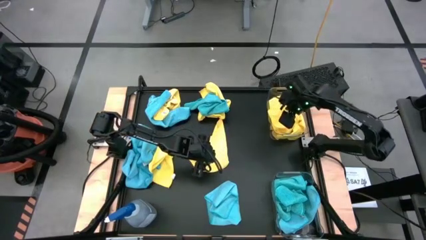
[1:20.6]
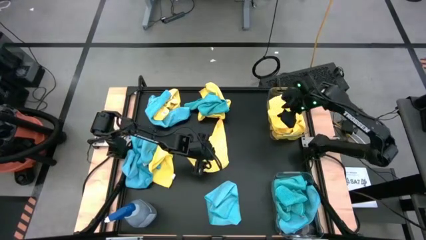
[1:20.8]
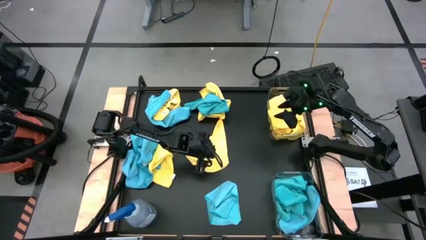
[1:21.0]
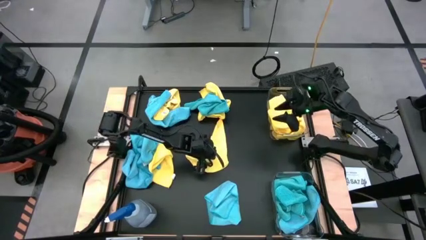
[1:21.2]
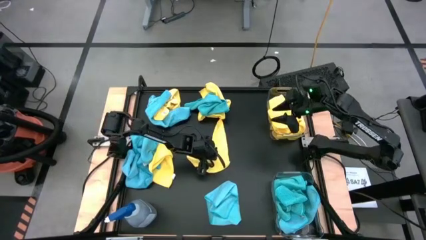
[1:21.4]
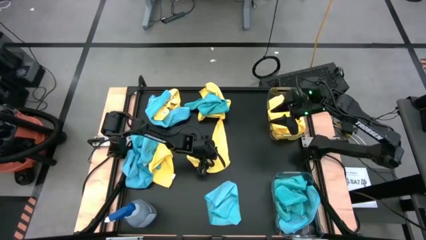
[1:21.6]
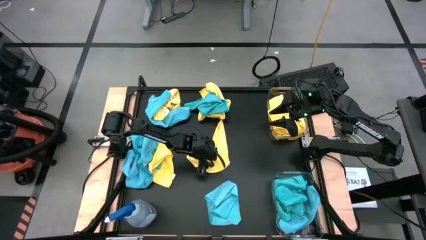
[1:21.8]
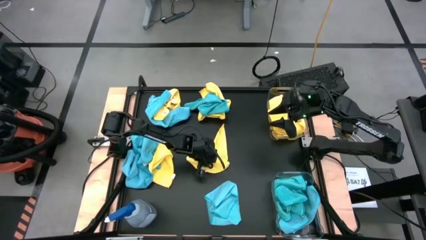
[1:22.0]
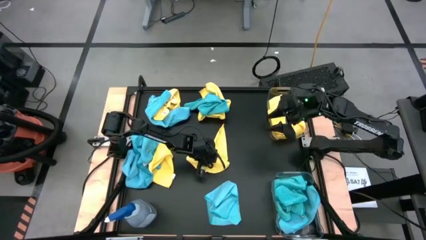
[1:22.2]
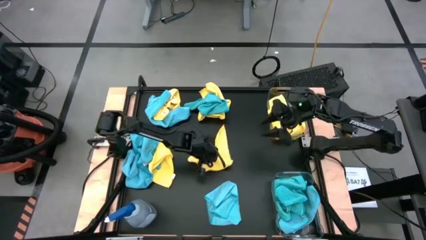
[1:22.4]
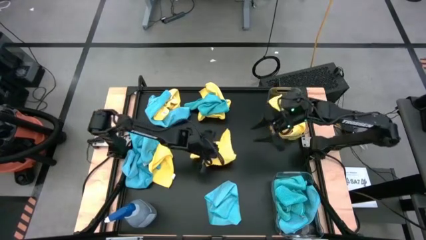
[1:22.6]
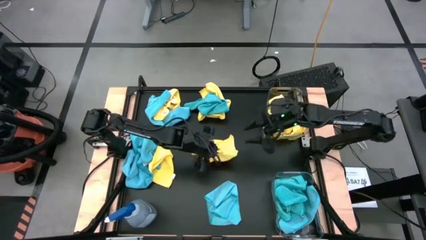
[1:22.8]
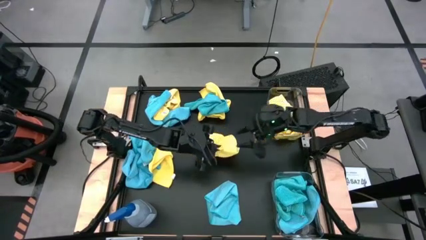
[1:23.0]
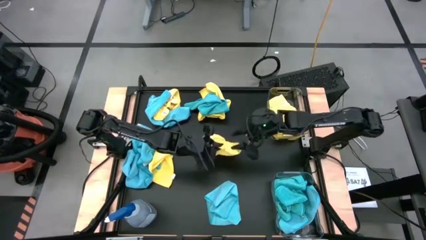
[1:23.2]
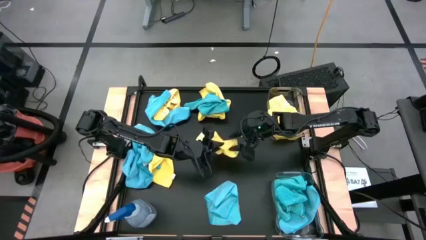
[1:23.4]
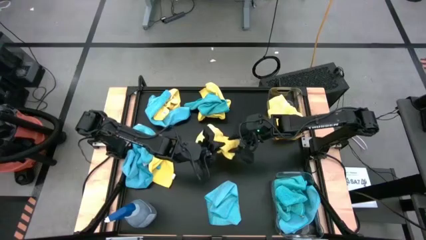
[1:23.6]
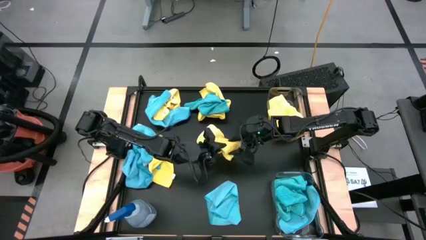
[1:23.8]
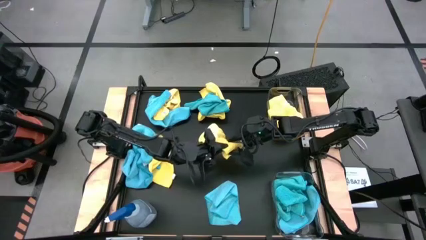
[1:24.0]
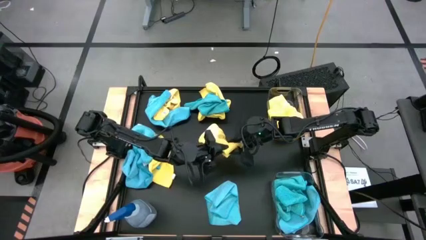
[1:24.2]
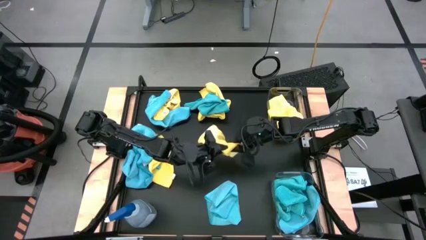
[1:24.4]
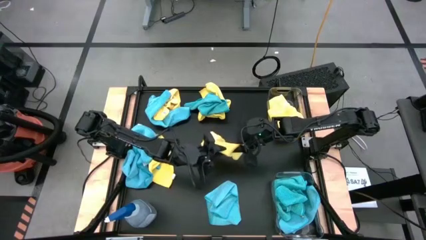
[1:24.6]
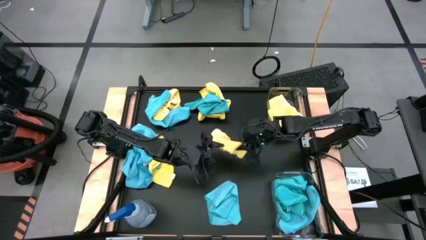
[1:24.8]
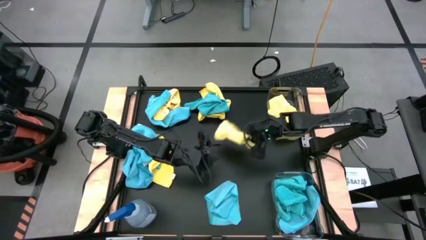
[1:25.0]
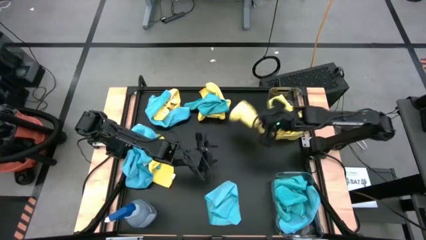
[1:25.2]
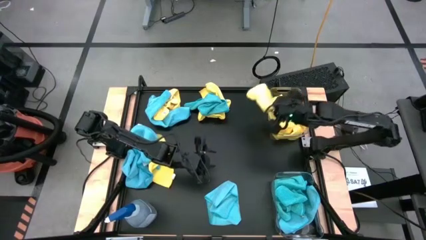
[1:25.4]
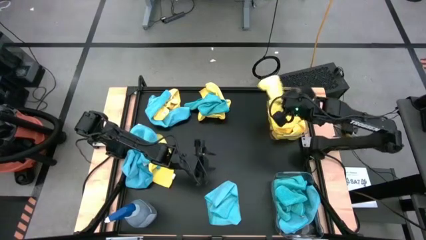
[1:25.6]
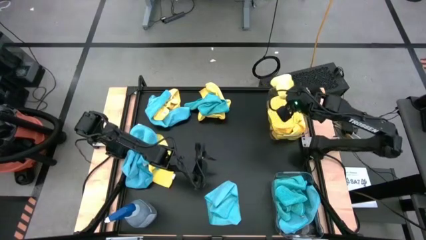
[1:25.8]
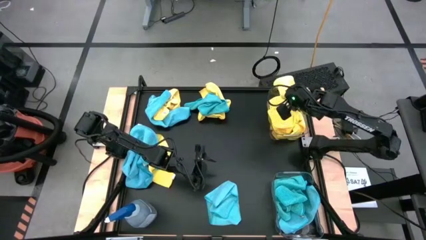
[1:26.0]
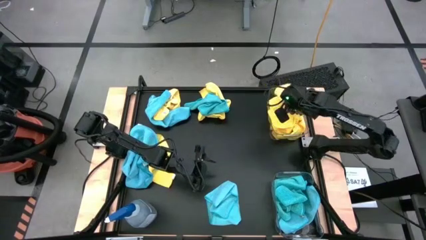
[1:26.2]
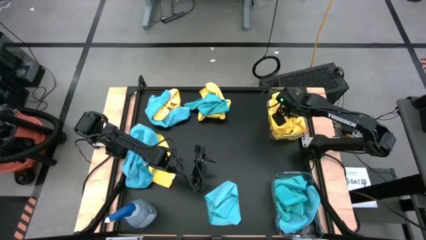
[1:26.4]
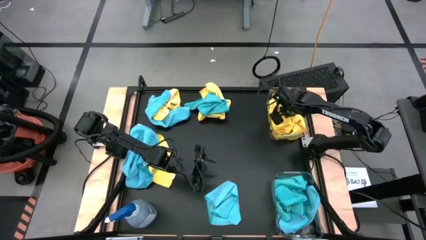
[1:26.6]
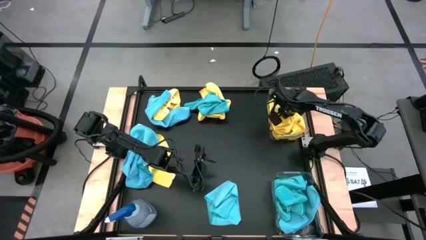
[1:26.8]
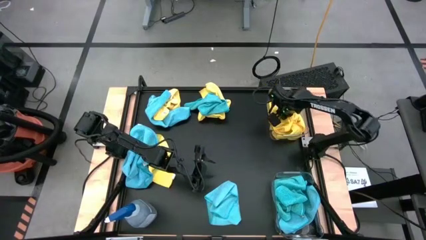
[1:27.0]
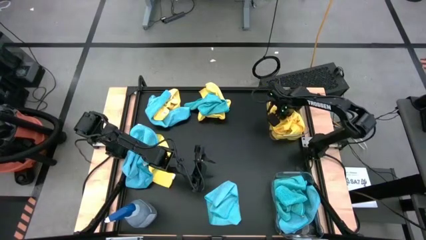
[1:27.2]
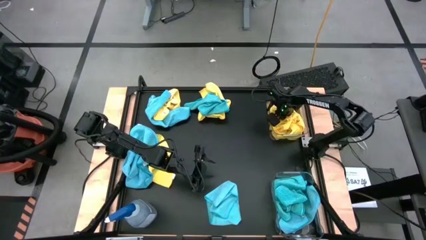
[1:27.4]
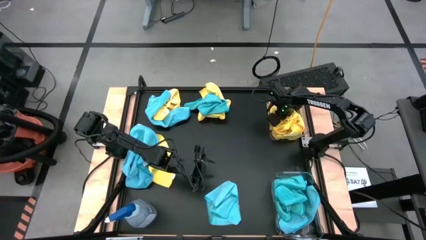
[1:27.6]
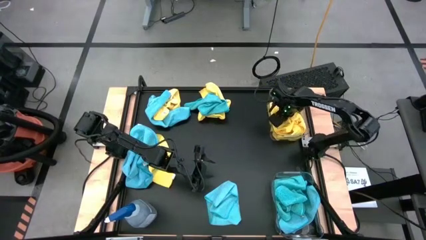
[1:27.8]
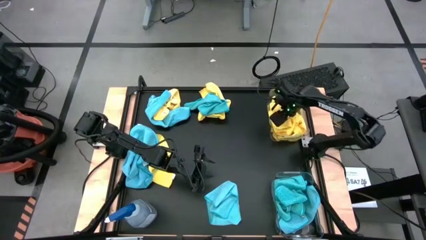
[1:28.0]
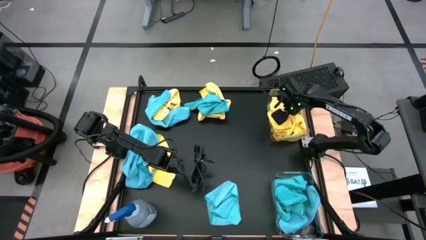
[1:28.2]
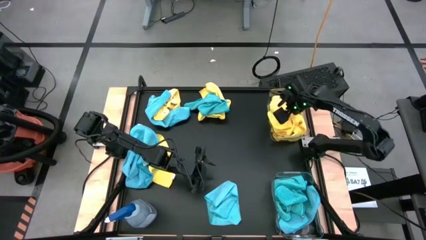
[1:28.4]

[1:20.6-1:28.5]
Task: Sort microfiber towel by color & place in baskets
Put the yellow towel into the top transparent bin

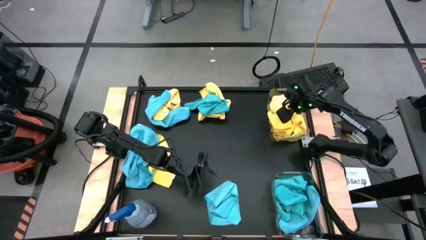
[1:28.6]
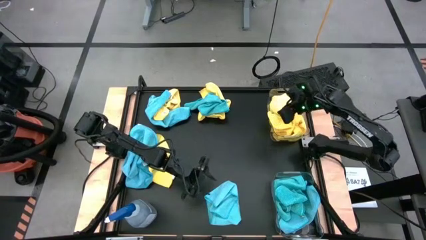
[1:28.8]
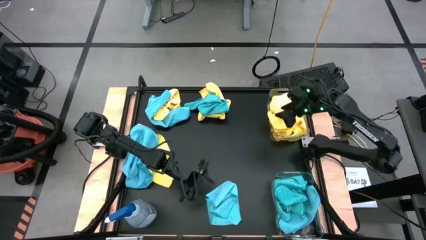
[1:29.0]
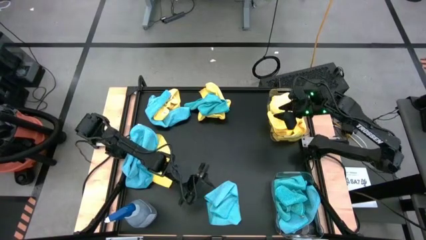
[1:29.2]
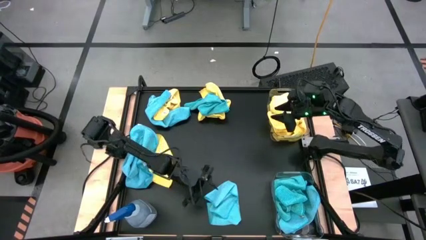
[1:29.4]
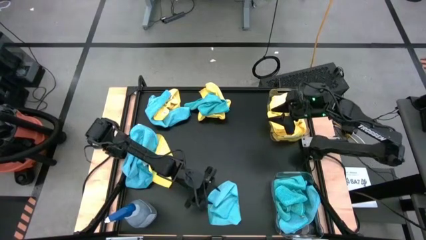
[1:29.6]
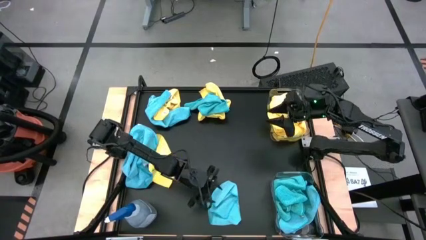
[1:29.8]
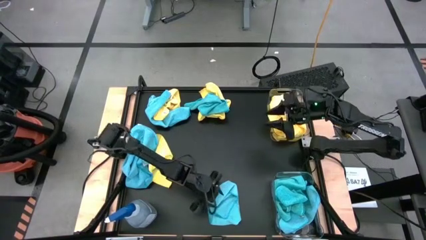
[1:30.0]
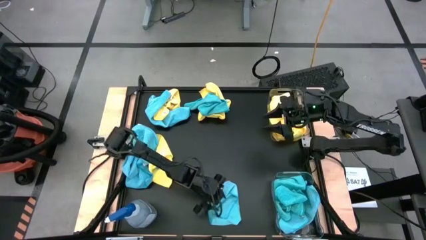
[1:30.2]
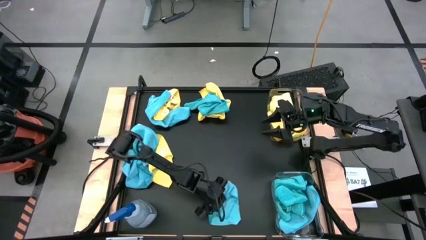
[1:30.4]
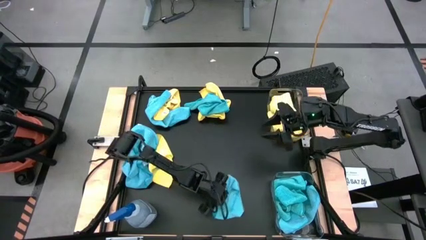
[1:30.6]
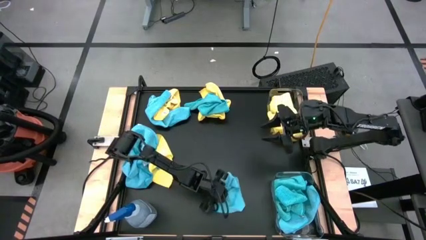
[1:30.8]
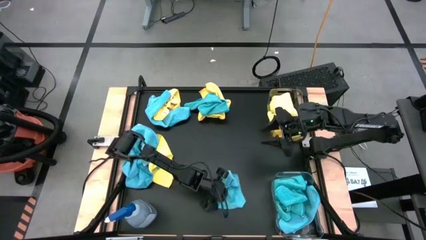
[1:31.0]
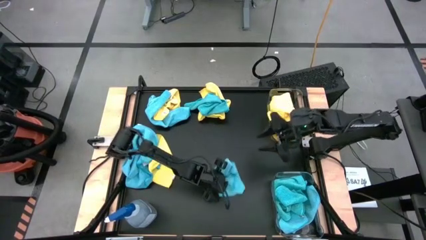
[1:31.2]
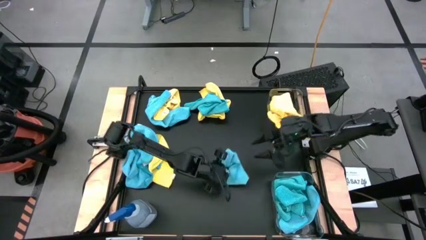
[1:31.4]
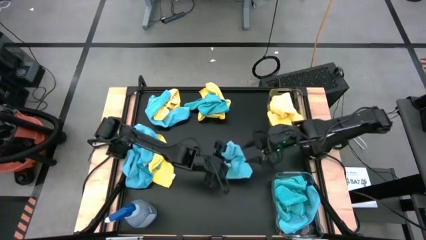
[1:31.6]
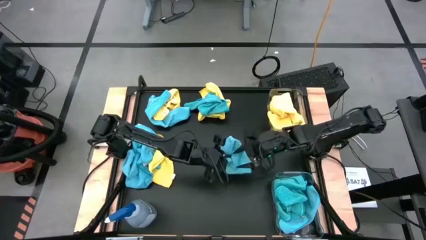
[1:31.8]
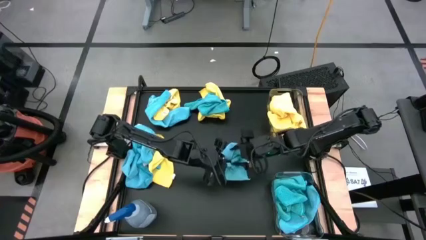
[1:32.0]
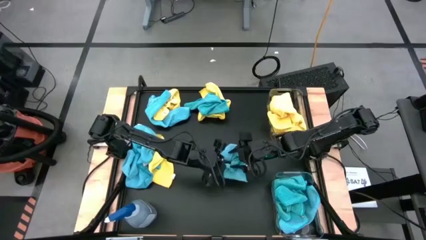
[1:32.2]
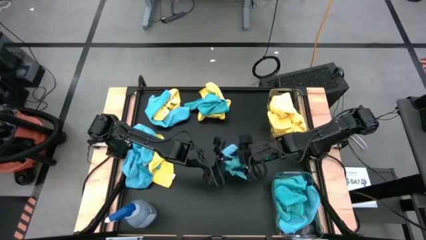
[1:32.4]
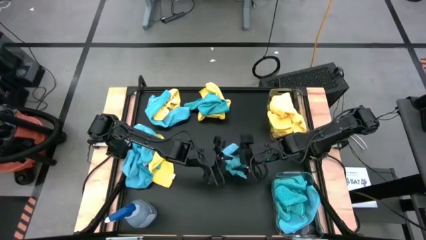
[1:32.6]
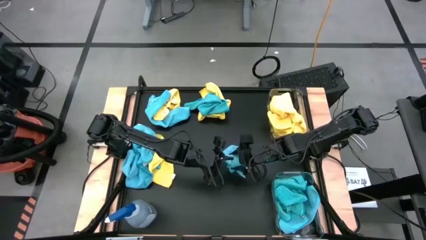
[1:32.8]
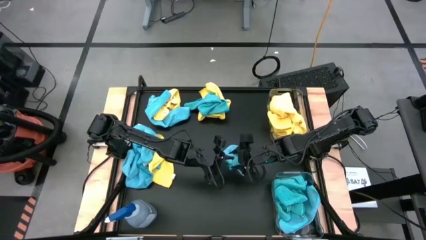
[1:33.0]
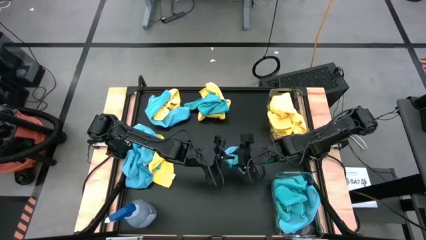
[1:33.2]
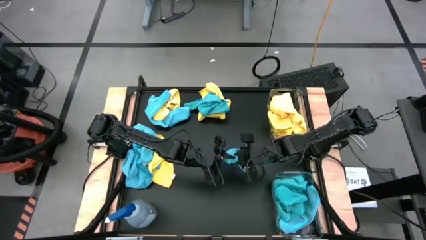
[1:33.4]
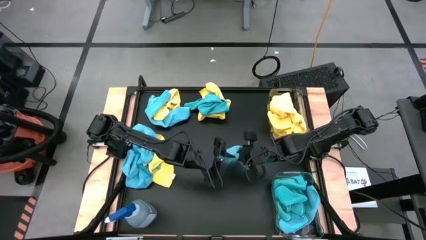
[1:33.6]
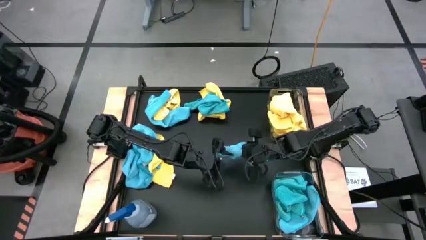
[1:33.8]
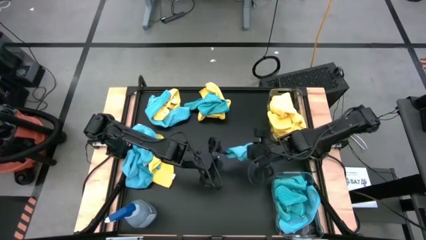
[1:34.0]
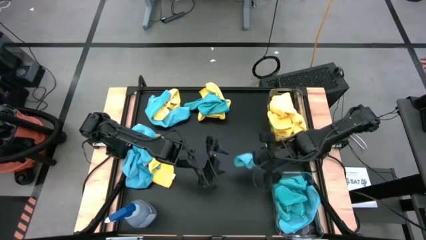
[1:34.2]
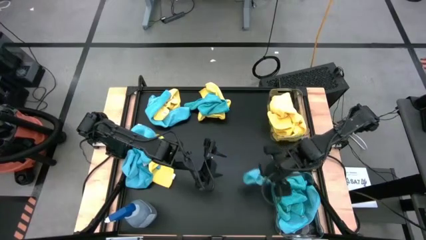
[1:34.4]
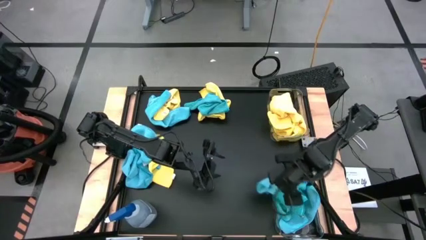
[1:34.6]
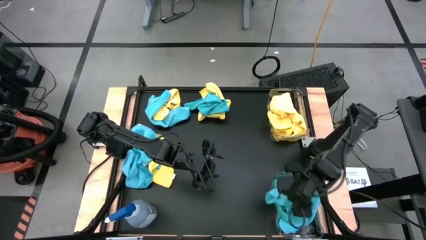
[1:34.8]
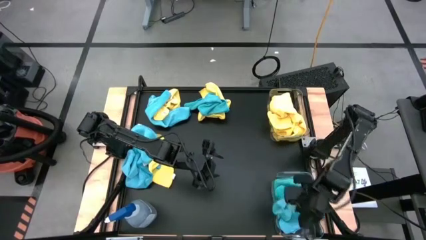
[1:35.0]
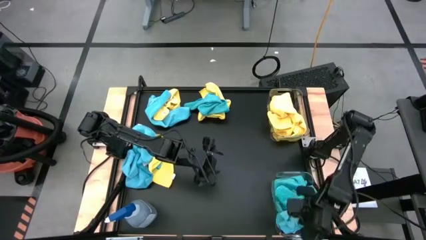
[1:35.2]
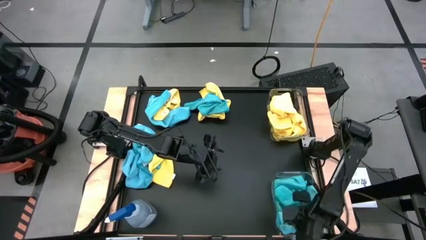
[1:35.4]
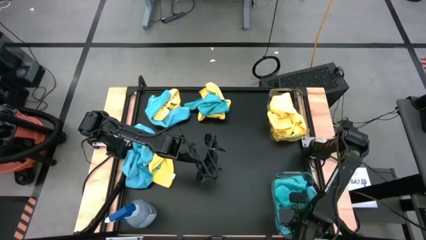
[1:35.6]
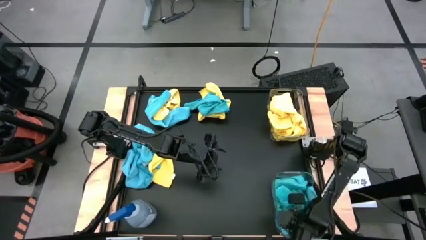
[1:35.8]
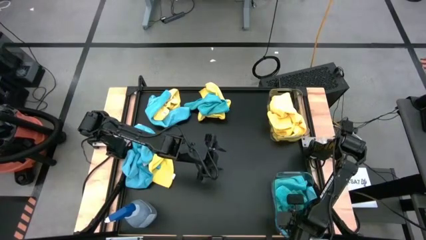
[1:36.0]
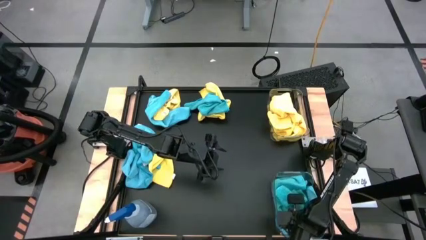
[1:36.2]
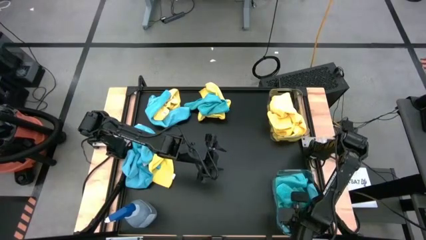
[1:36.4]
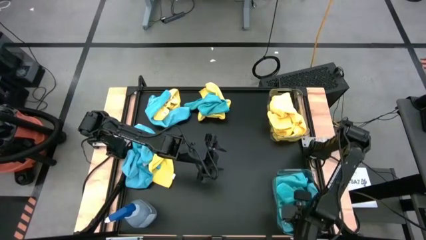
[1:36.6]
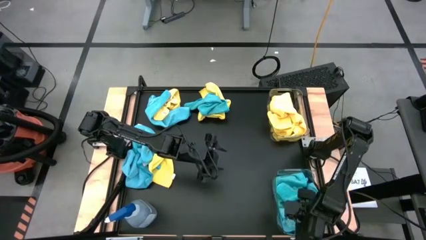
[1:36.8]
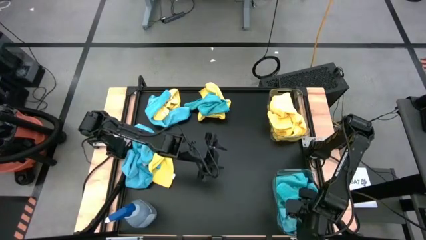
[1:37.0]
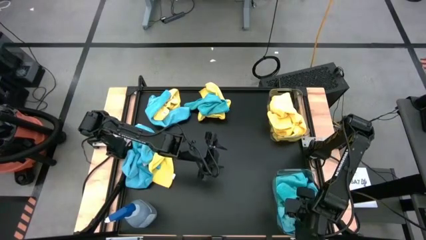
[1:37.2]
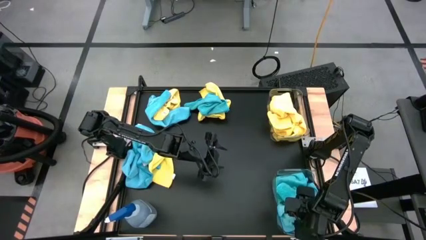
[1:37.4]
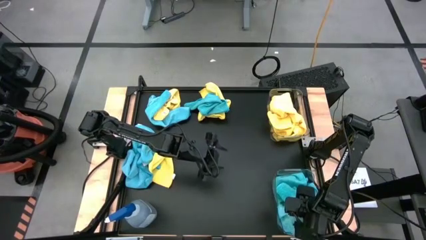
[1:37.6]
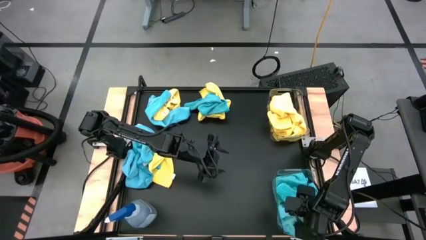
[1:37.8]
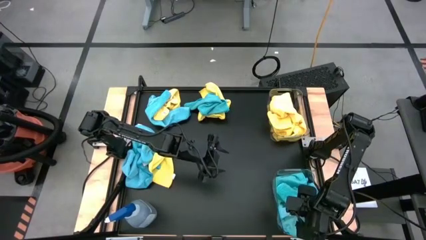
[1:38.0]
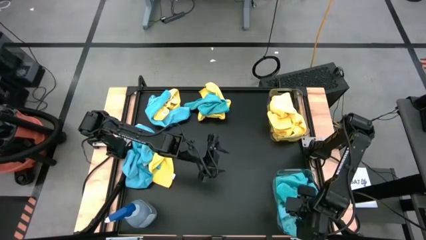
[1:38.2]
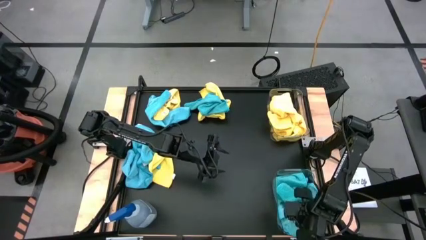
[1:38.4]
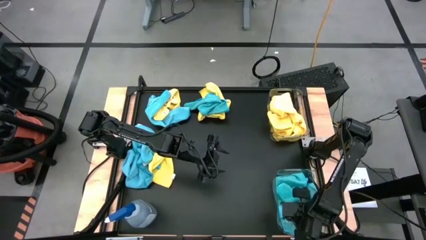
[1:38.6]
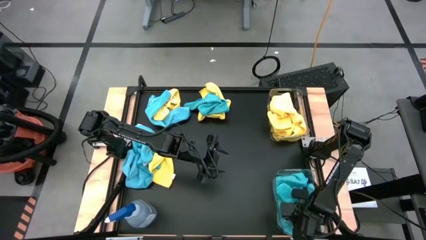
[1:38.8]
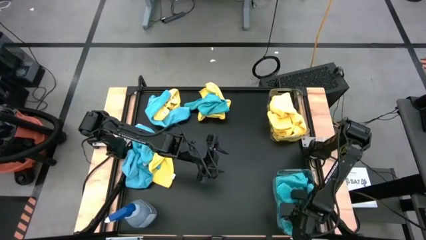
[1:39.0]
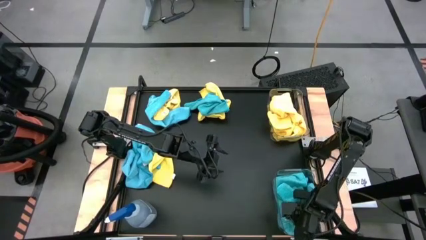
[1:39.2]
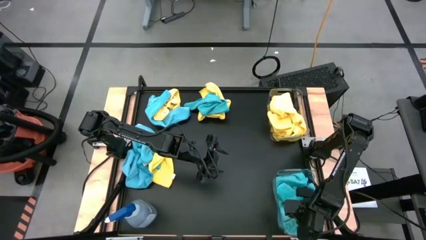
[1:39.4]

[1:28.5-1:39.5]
Put the blue towel into the bottom transparent bin
